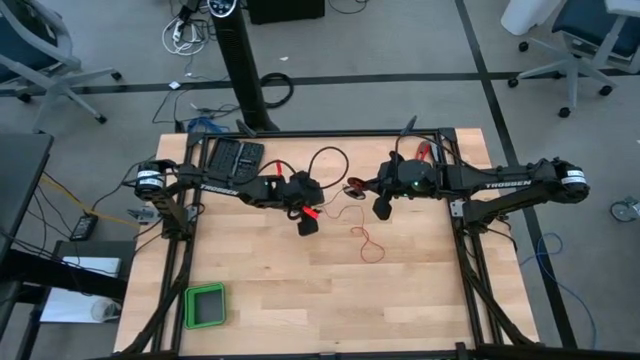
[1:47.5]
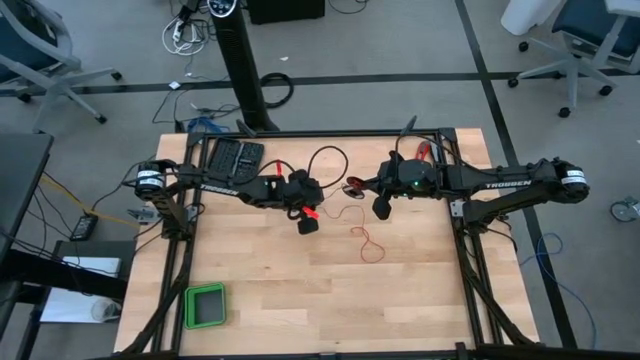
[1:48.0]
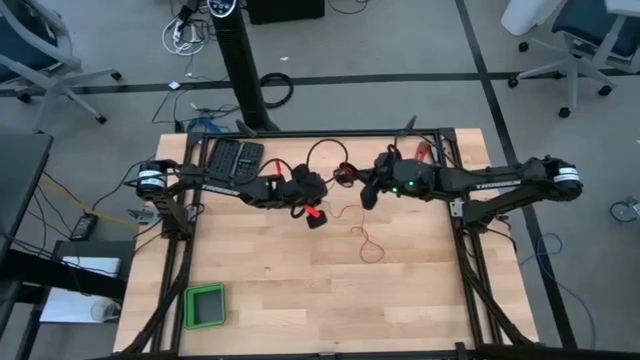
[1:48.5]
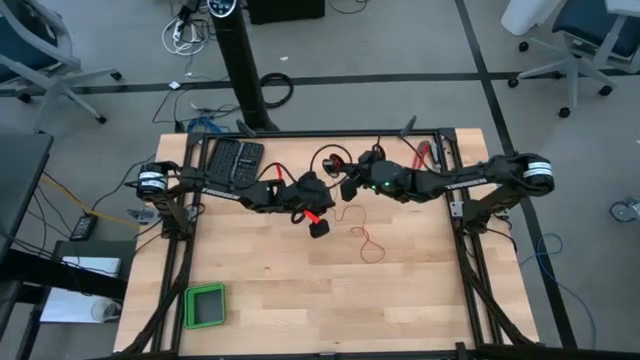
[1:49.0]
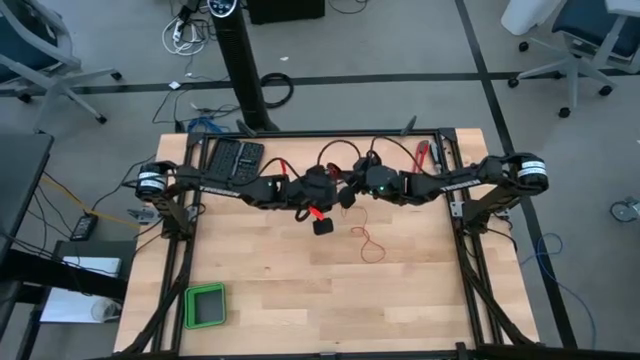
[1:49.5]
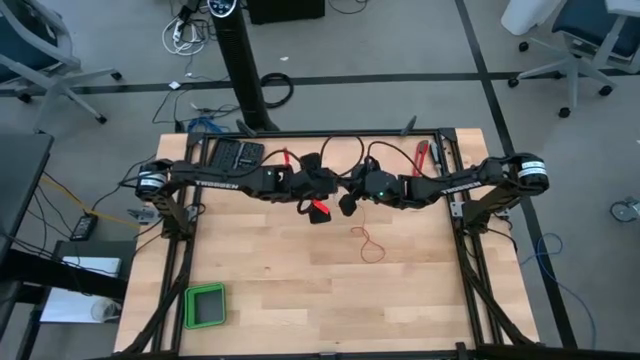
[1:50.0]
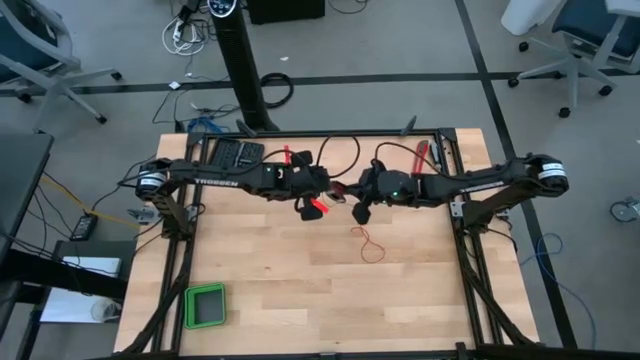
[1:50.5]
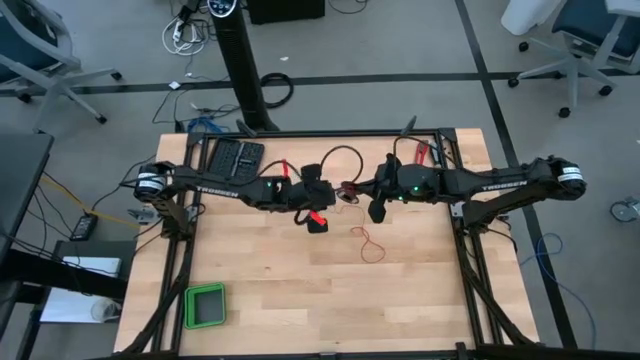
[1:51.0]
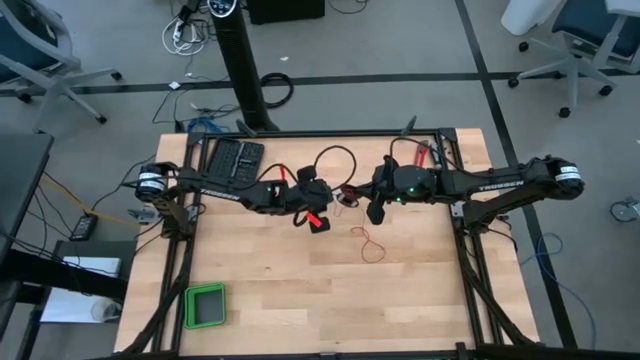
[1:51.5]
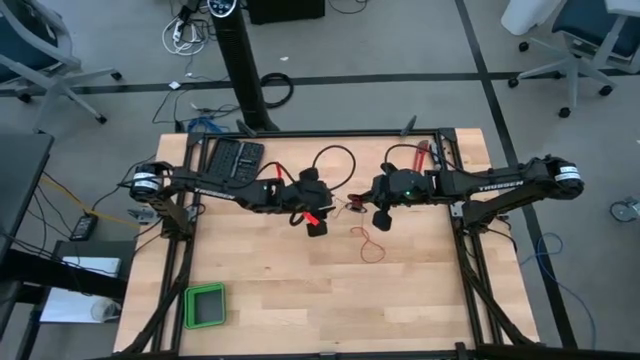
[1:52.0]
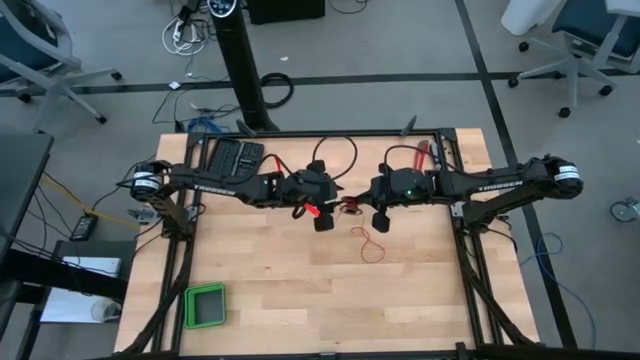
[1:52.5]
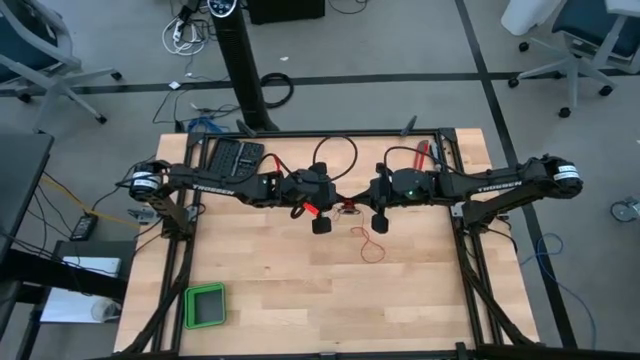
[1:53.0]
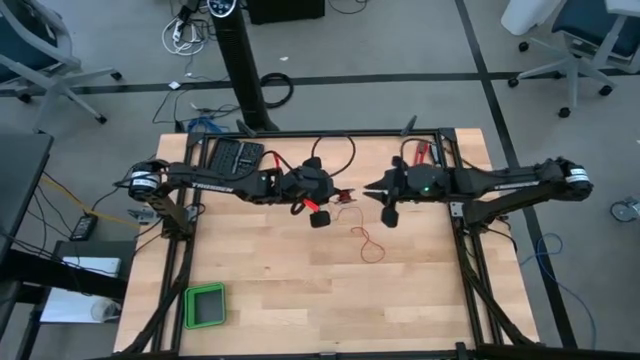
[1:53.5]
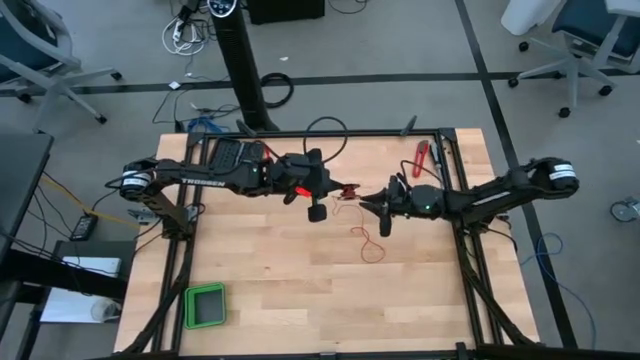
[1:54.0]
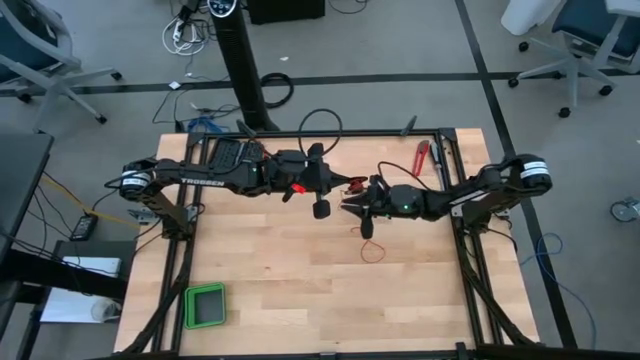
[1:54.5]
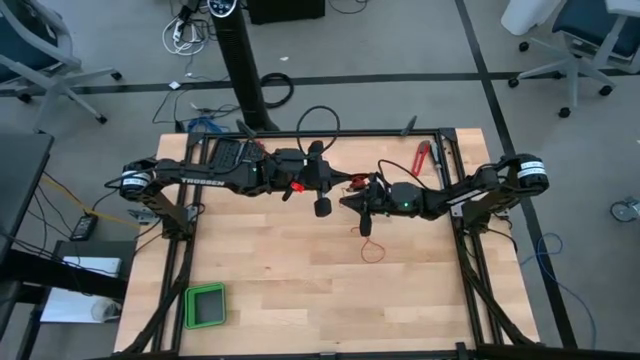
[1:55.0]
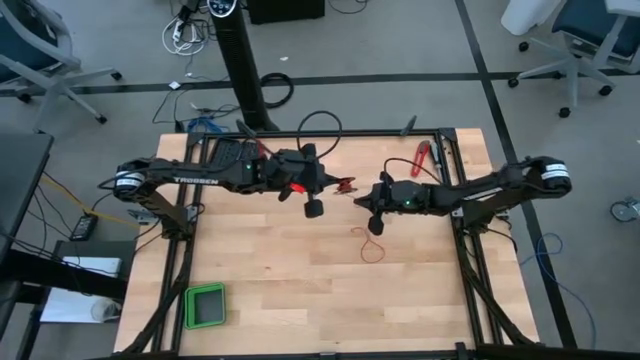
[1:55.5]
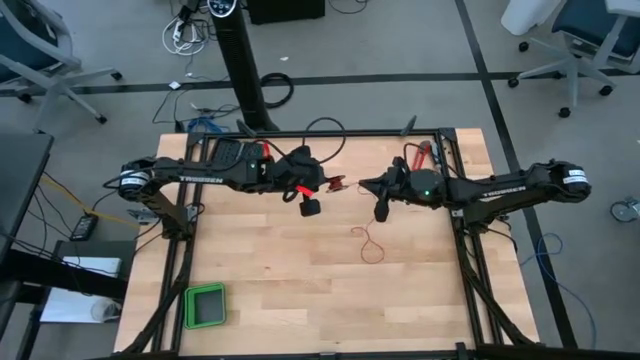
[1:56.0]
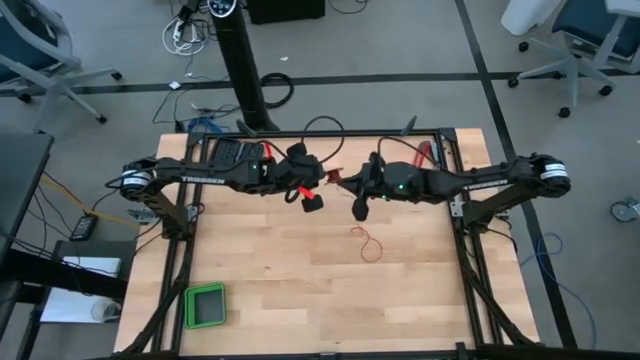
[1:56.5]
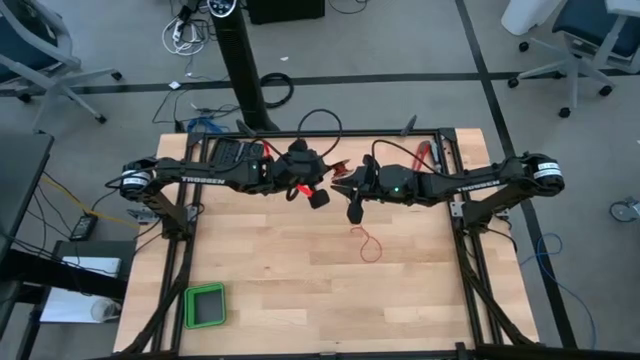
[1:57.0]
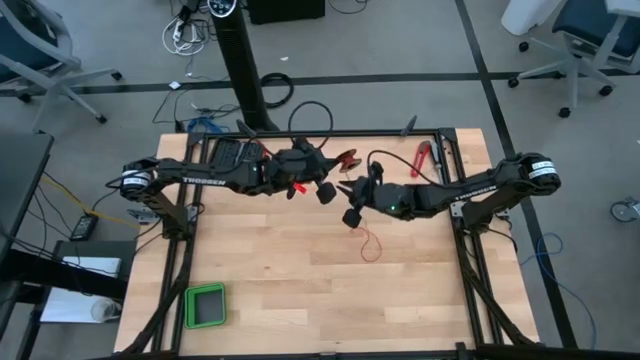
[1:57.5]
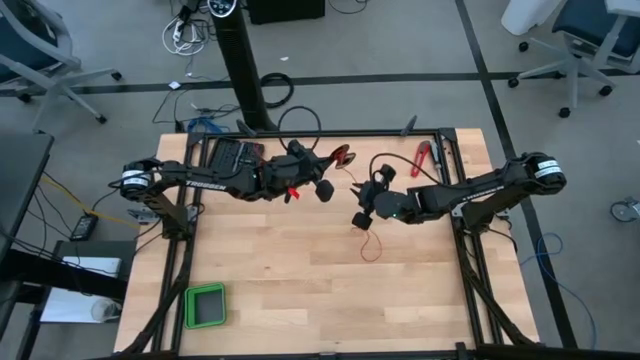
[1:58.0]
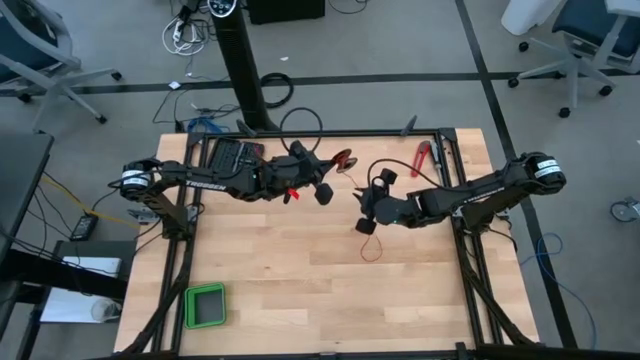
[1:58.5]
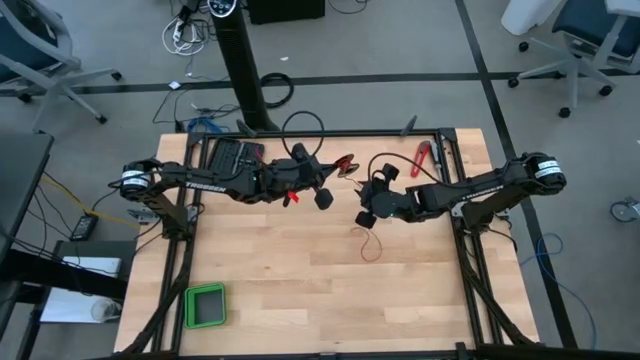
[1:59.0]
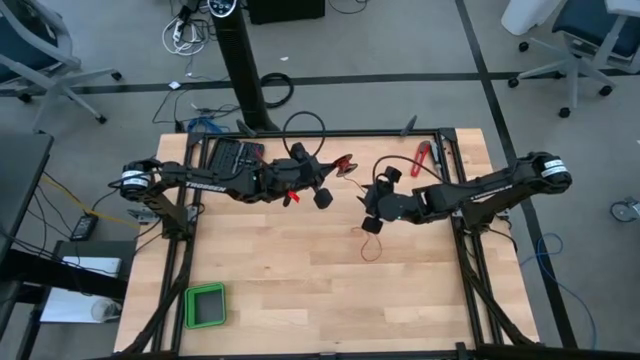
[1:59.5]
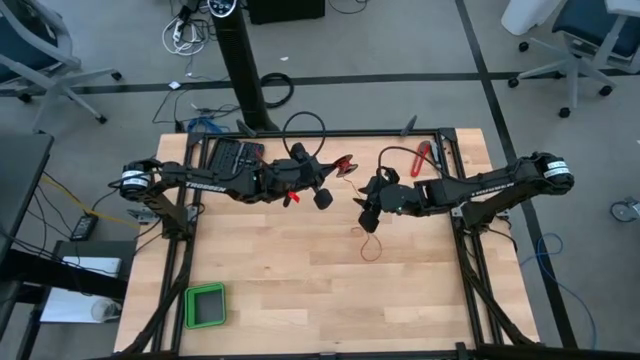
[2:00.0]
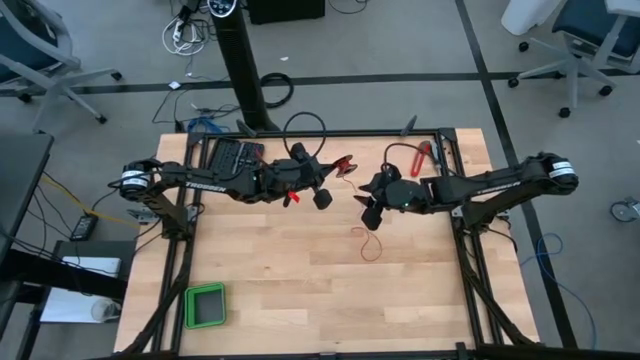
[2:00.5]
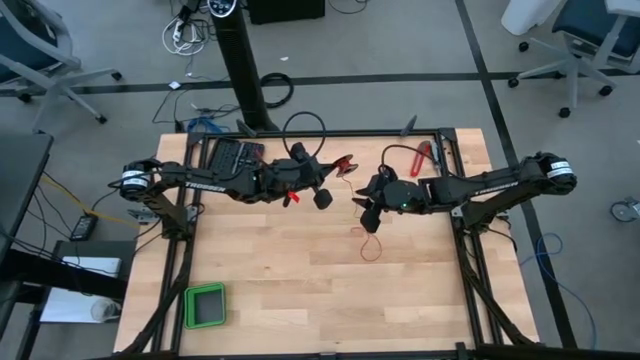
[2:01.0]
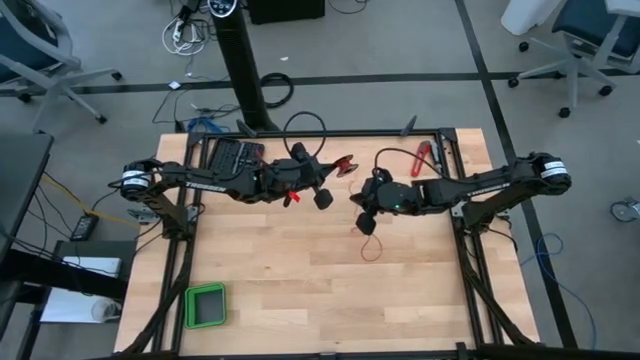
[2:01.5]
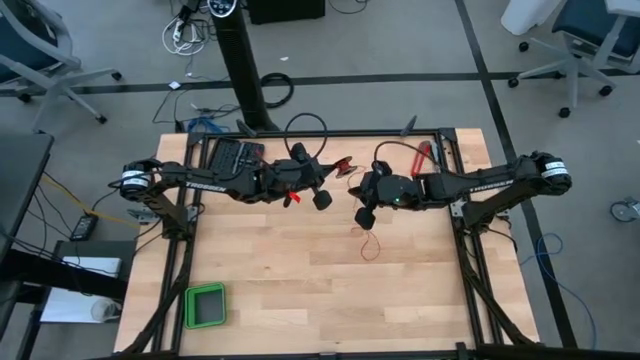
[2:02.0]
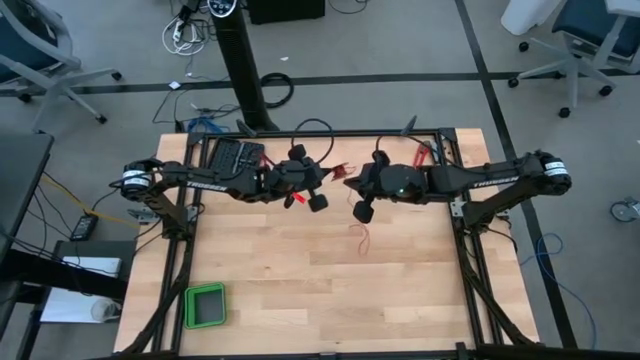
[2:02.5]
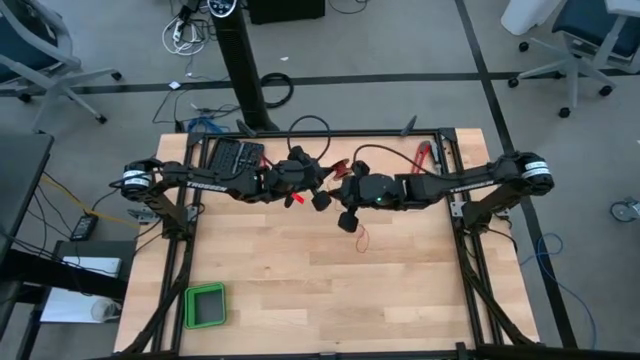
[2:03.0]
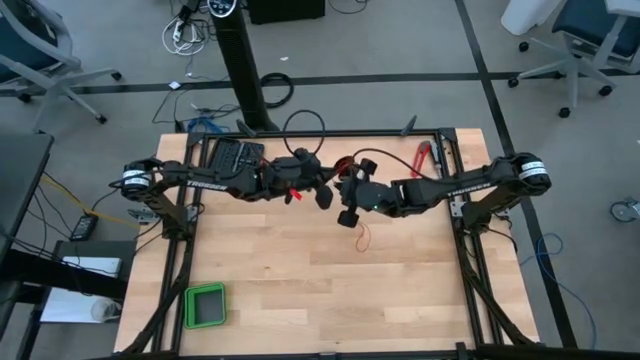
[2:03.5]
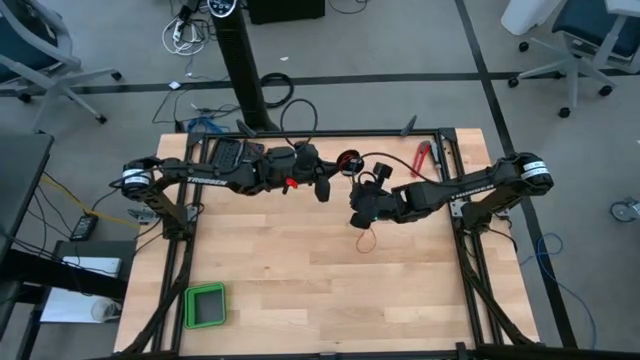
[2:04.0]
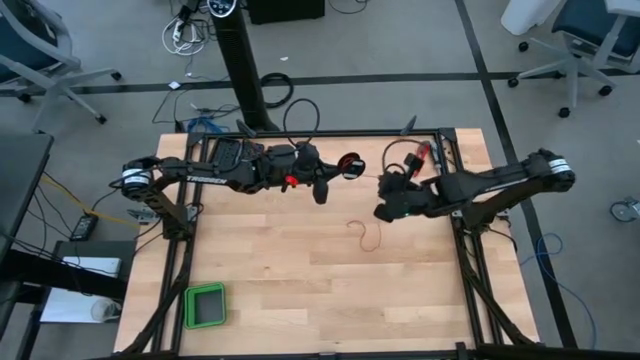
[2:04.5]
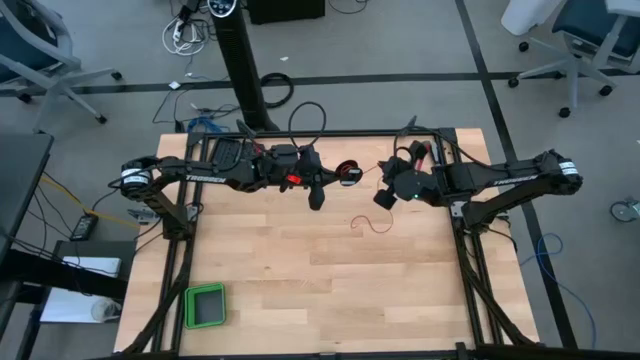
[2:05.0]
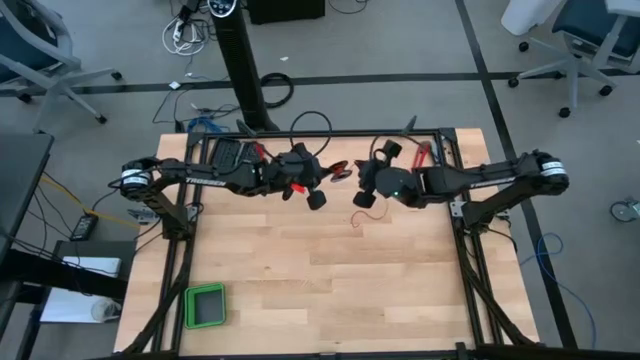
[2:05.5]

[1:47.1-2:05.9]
Task: Coil cords
Coil the red wire onto the black spool

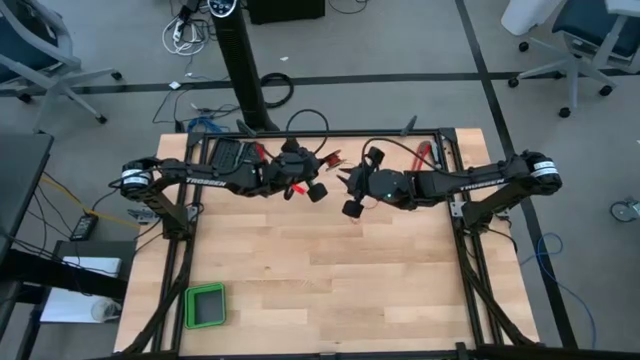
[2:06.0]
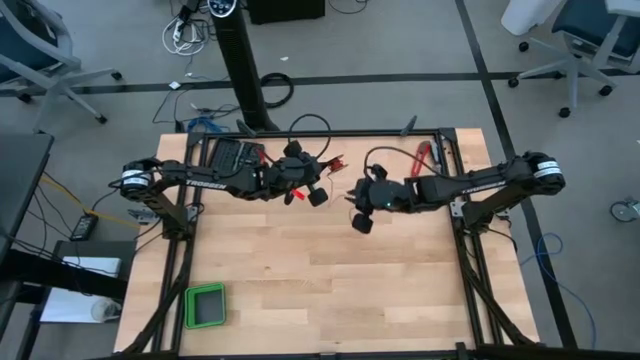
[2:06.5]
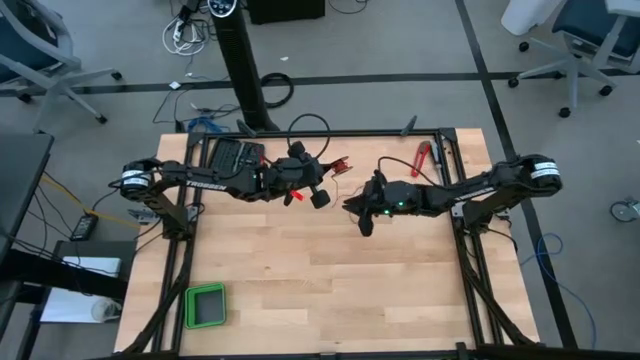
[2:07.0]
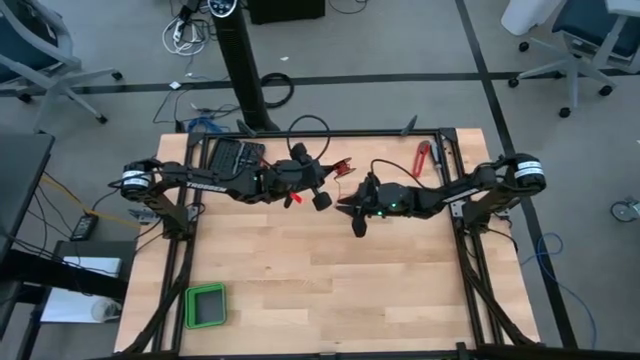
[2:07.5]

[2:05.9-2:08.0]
Coil the red wire onto the black spool
